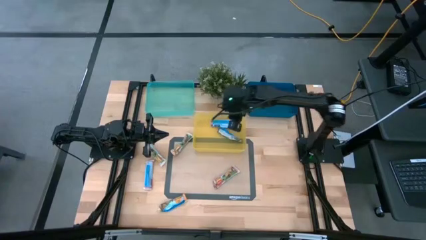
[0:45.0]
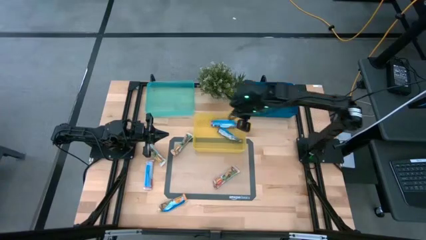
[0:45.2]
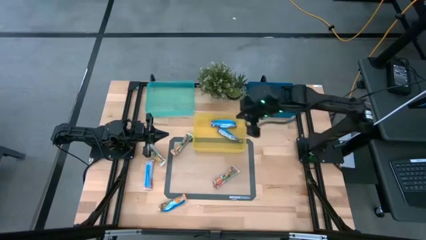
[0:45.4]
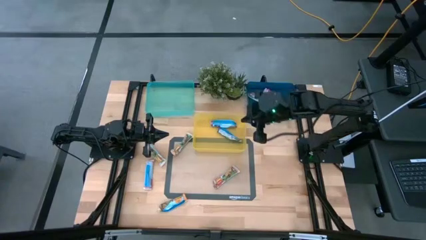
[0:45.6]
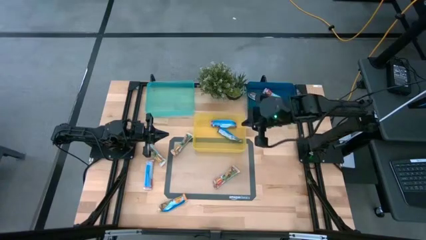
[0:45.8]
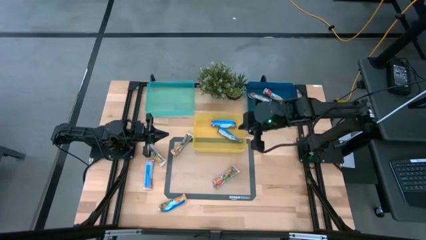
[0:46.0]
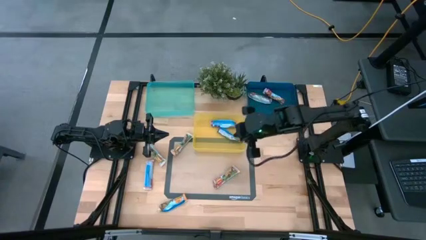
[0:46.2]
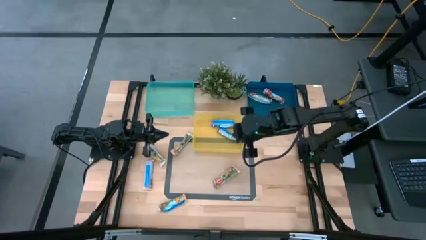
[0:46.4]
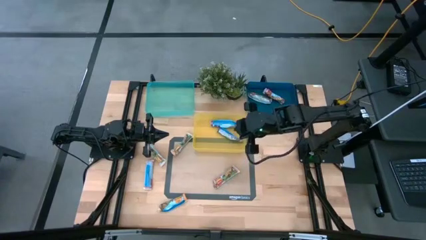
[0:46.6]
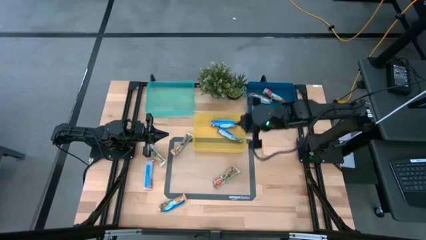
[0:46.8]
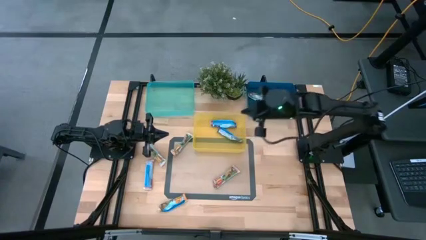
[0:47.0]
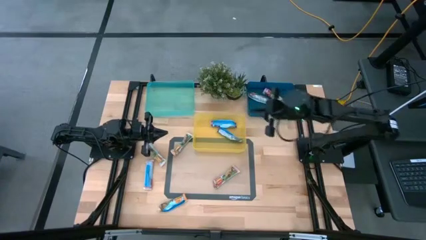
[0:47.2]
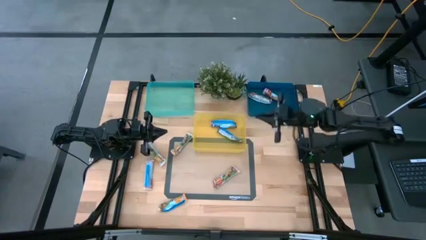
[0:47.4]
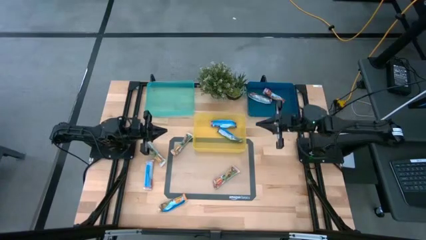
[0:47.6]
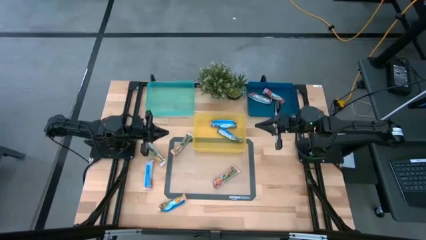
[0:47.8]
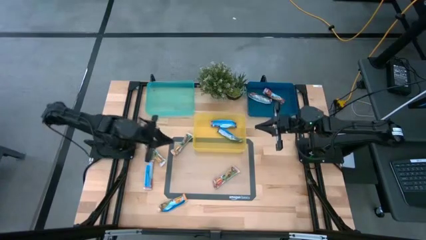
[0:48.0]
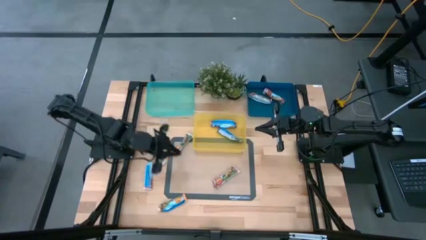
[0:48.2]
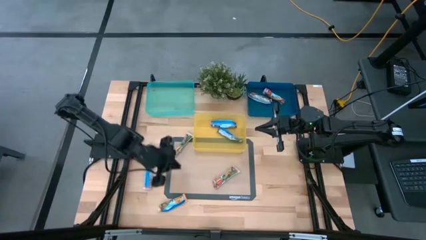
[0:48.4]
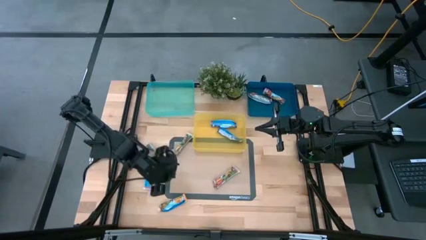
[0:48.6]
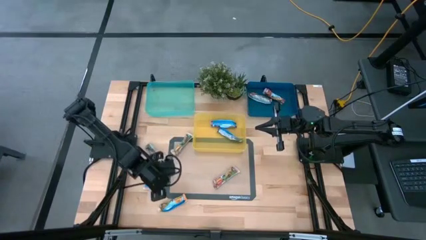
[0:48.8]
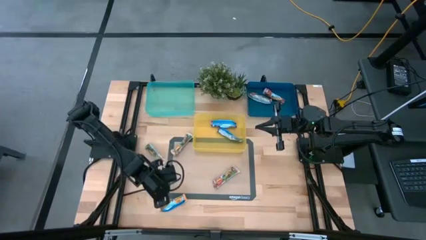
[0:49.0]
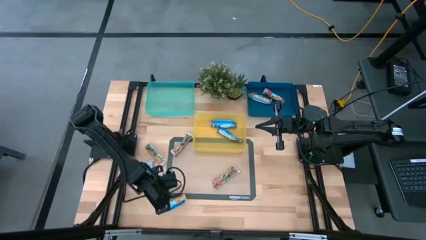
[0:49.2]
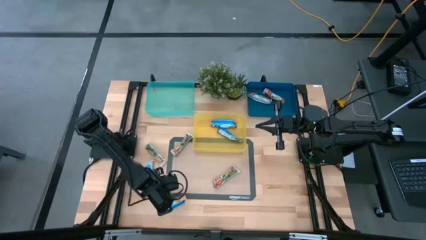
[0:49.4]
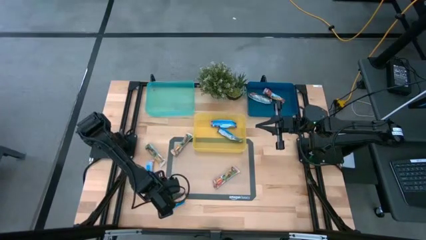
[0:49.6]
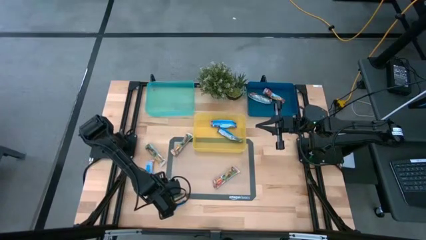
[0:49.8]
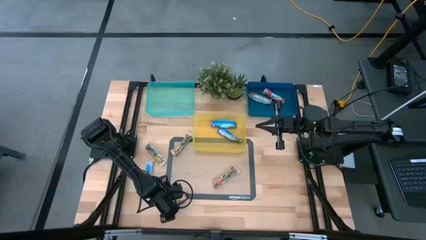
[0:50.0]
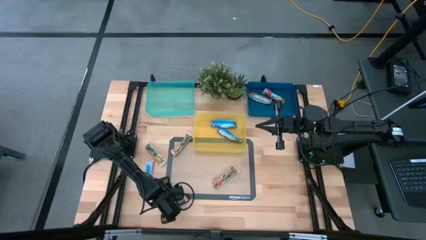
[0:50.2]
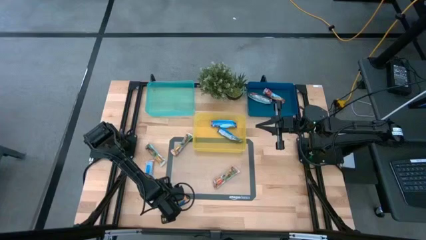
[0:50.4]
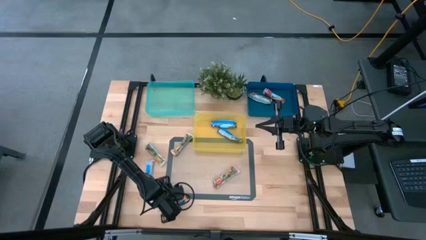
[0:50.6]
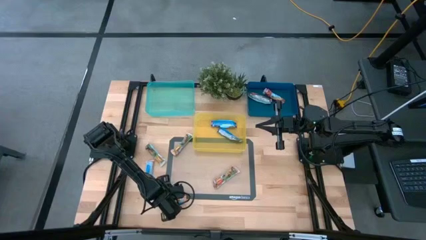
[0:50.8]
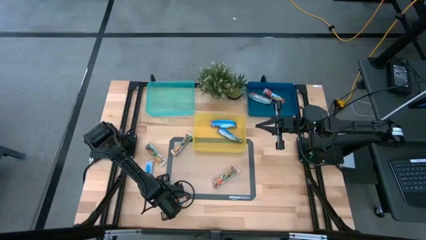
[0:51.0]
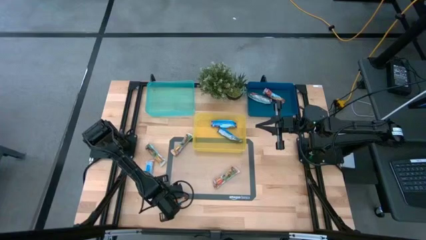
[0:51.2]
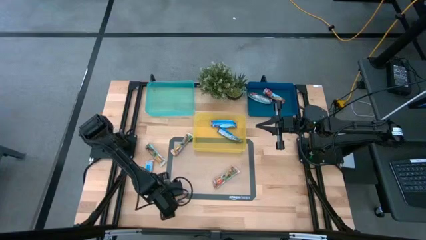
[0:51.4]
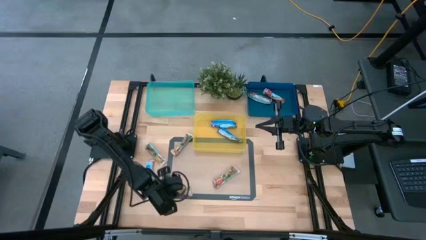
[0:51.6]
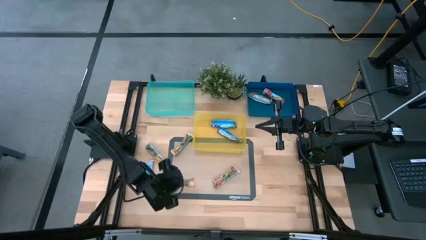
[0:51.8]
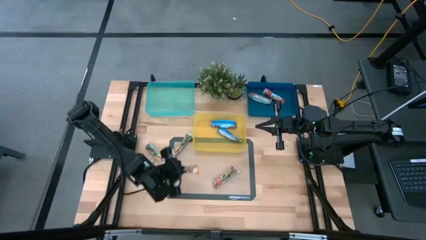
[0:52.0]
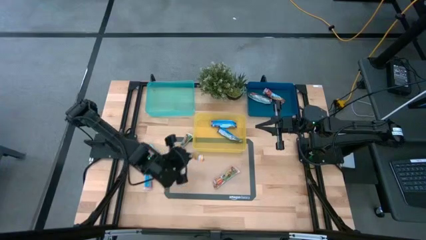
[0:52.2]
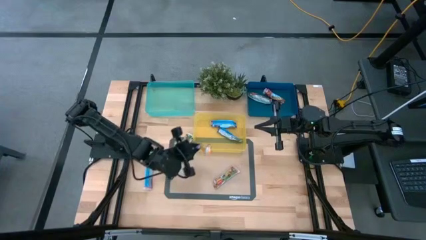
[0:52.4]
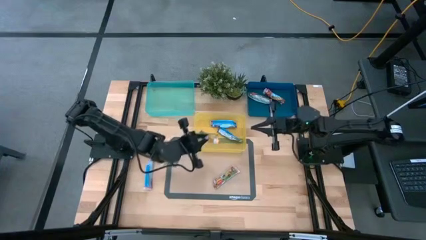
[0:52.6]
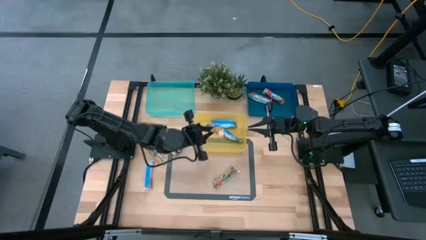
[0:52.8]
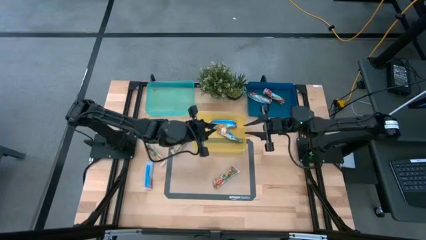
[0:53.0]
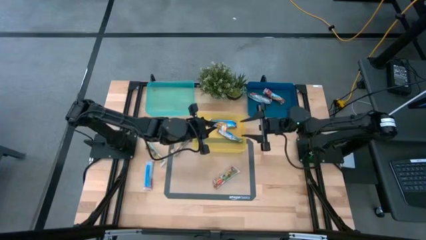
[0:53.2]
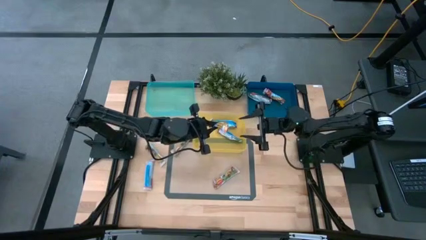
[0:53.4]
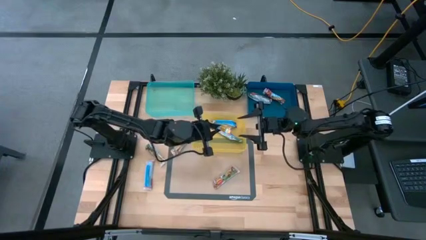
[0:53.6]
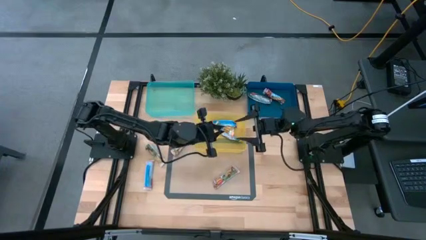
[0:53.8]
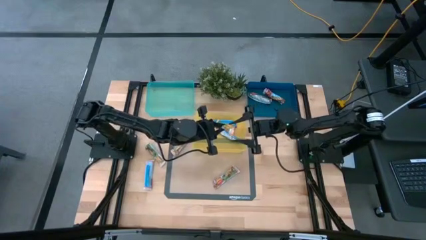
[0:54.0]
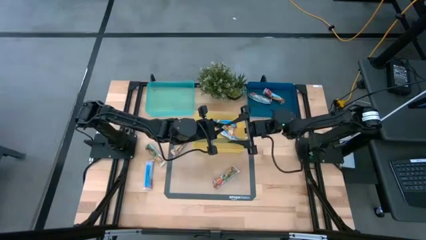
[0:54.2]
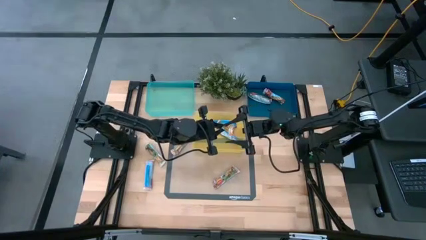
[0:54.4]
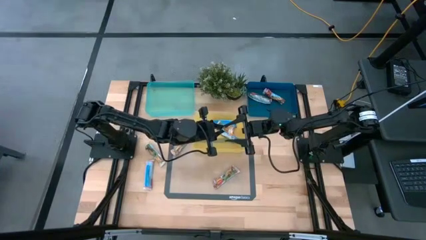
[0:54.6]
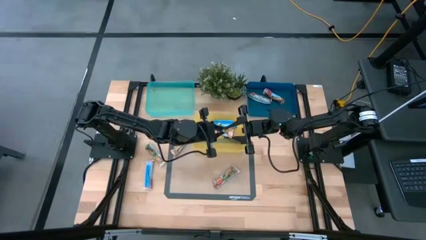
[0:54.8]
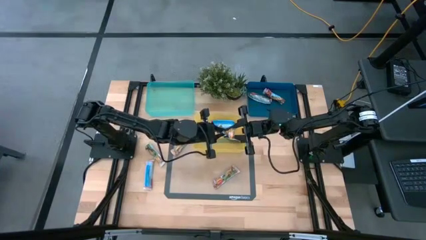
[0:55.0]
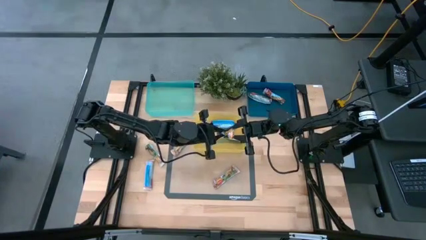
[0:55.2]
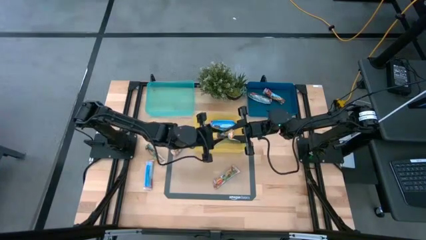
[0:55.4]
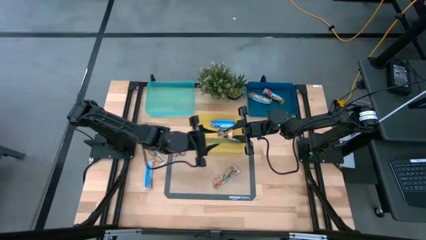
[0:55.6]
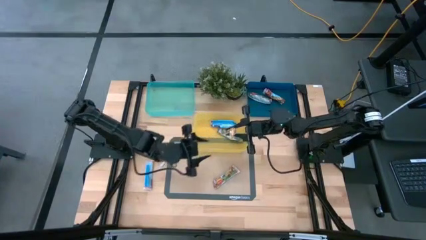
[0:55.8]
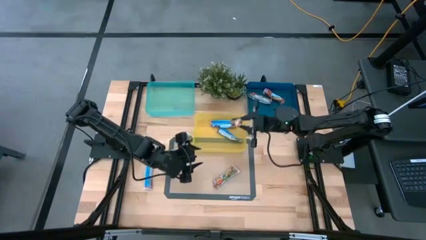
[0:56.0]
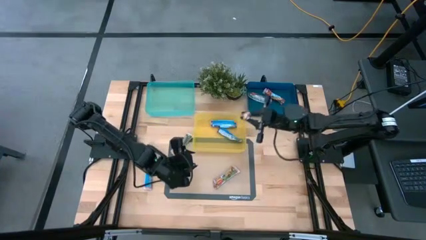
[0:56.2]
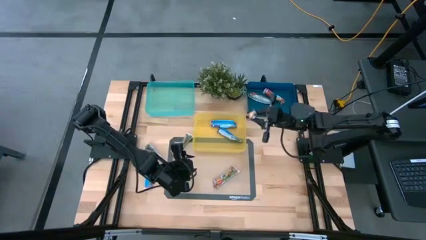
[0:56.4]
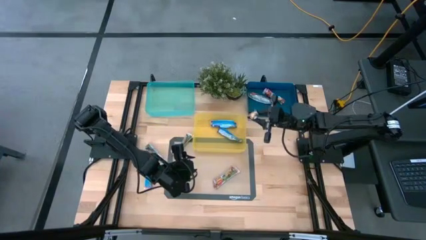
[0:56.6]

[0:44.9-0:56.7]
Task: Pick and place Granola Bars by type
Put the orange granola bar into the green bin

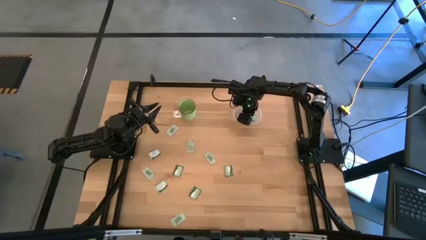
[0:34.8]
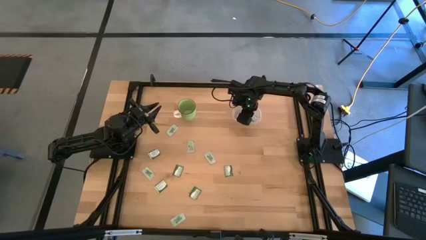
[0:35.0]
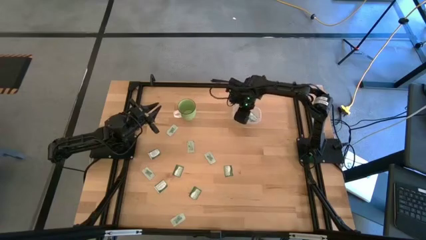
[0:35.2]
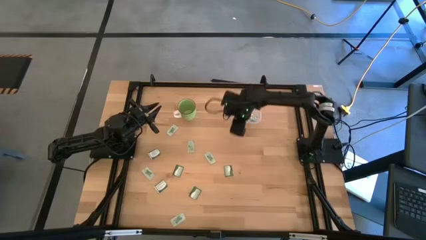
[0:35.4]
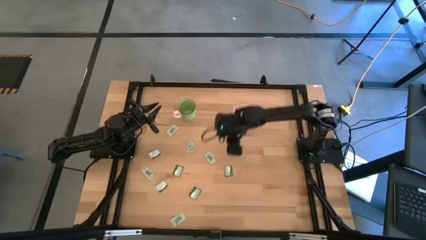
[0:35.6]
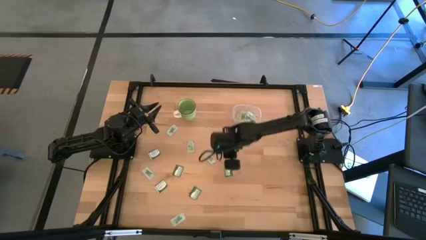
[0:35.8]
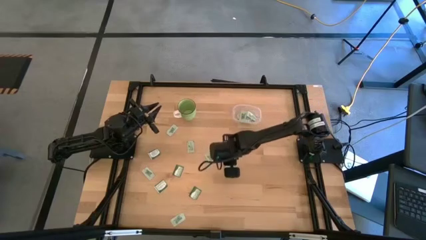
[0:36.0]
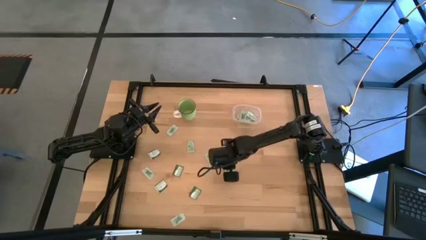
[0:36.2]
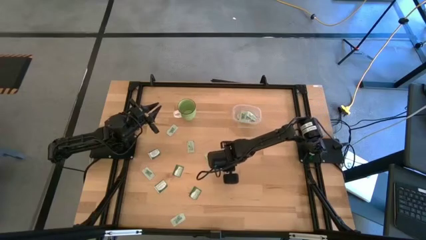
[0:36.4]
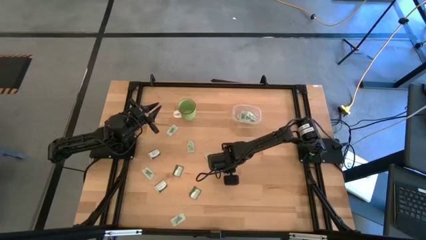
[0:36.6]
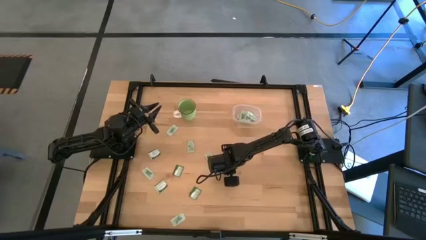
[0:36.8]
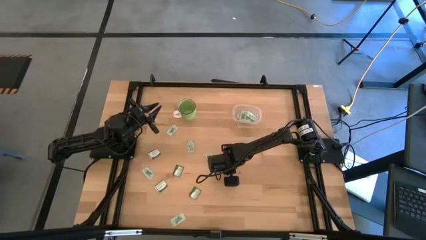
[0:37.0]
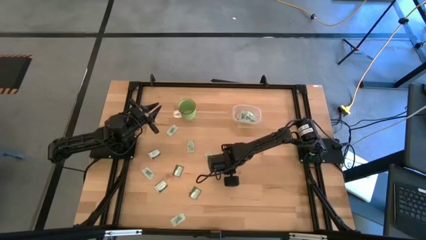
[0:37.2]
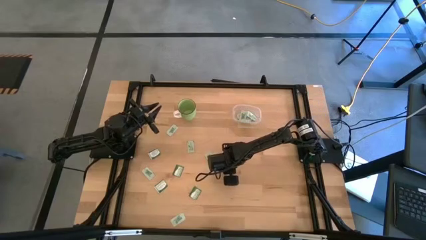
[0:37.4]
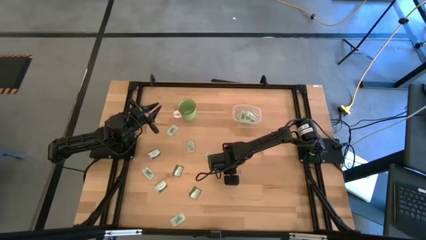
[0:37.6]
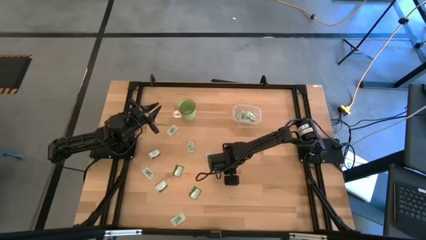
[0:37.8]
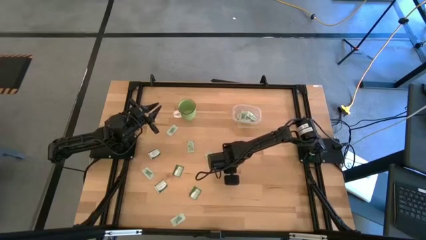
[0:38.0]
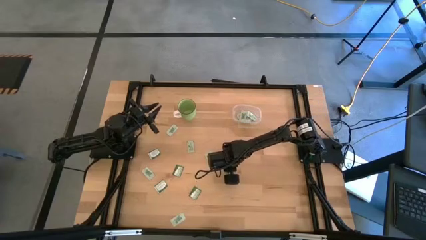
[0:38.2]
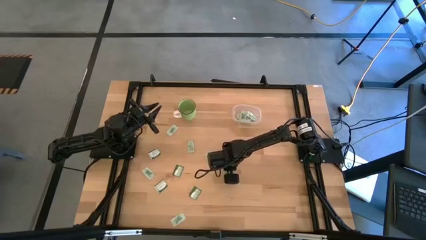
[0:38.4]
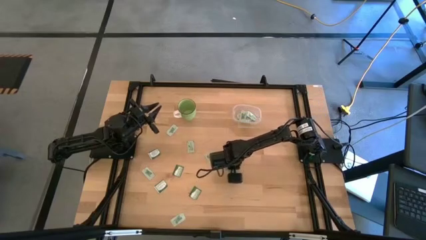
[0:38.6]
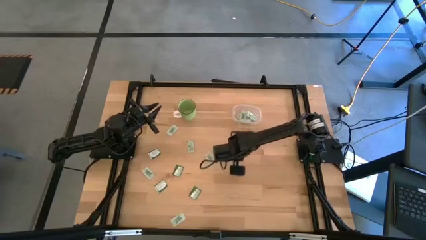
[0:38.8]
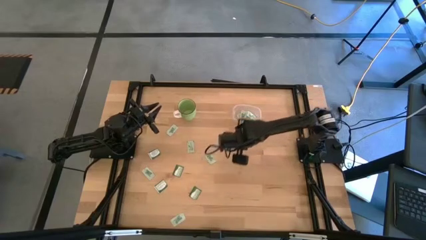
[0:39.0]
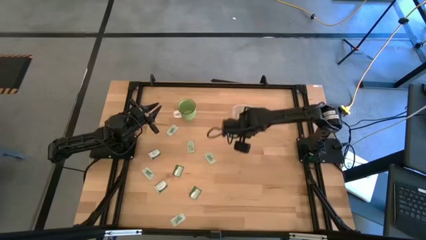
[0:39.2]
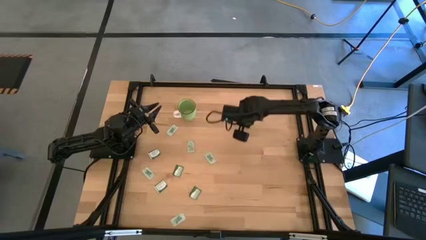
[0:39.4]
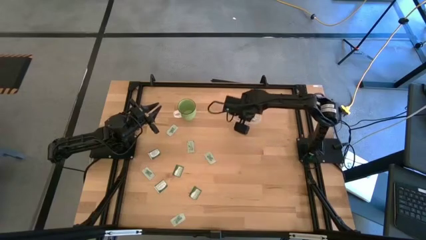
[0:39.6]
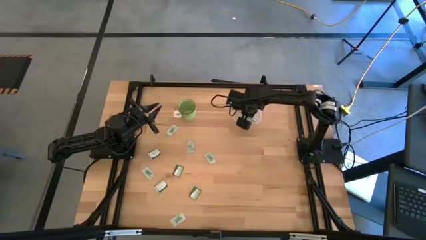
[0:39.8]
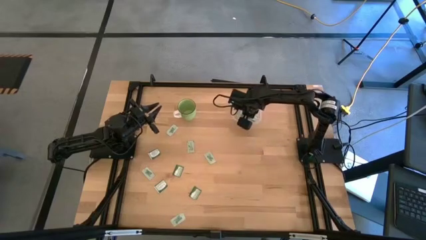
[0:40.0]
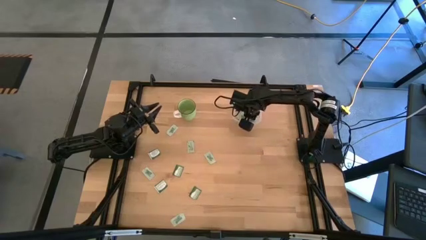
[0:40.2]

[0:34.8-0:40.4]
Task: Pick and place items into bin
Put the green truvia packet into the transparent bin
